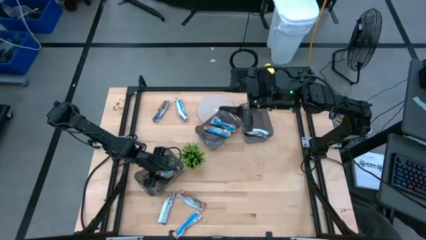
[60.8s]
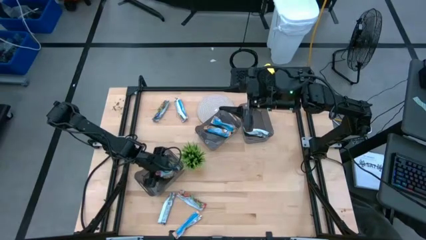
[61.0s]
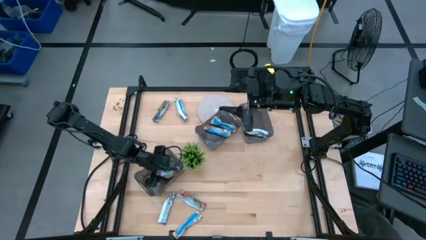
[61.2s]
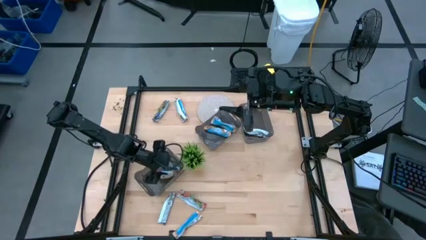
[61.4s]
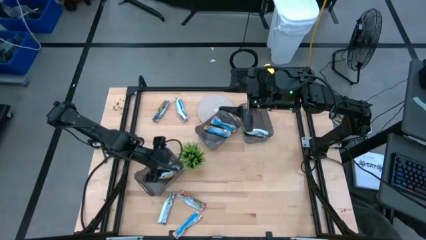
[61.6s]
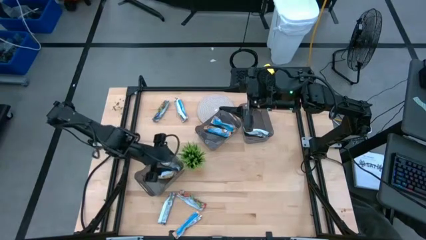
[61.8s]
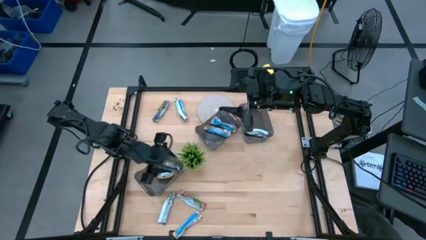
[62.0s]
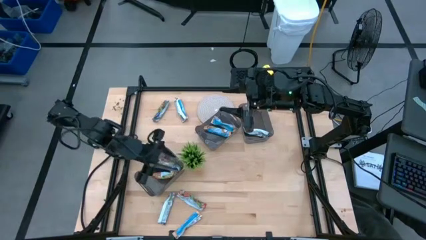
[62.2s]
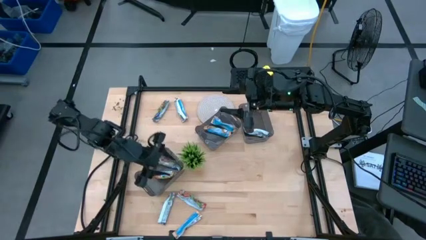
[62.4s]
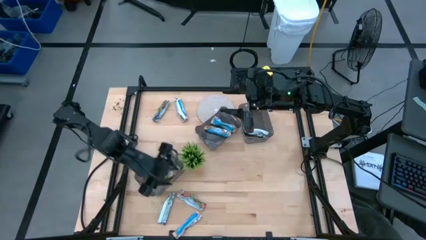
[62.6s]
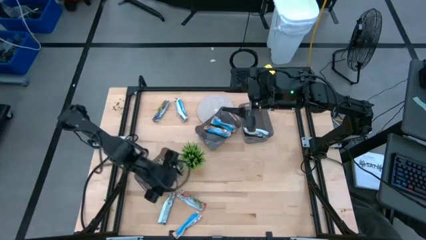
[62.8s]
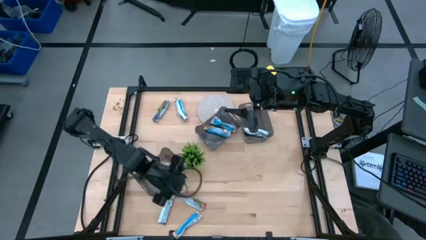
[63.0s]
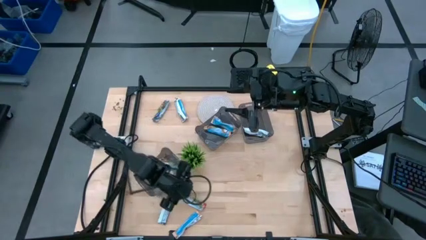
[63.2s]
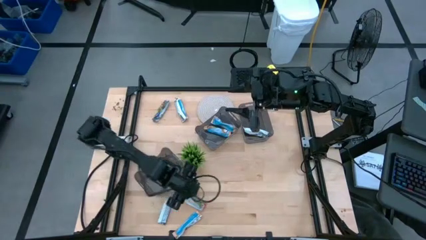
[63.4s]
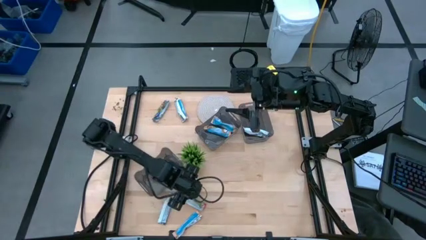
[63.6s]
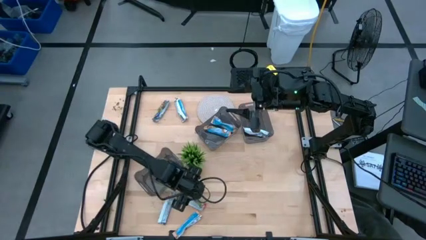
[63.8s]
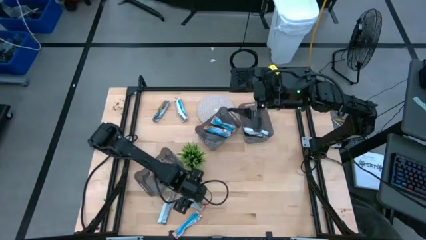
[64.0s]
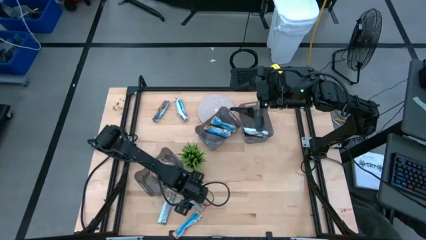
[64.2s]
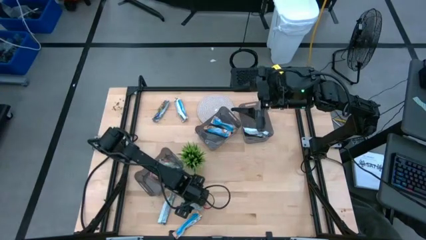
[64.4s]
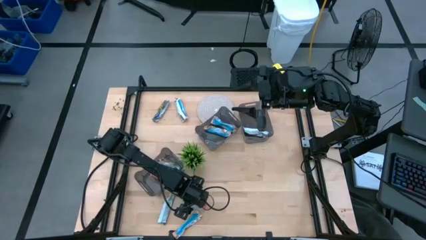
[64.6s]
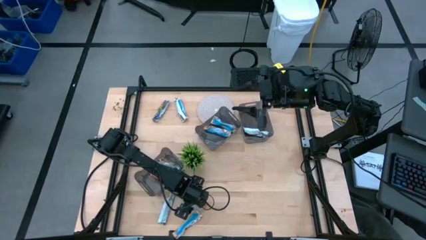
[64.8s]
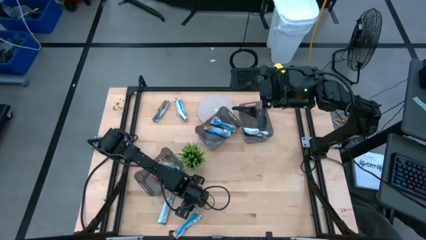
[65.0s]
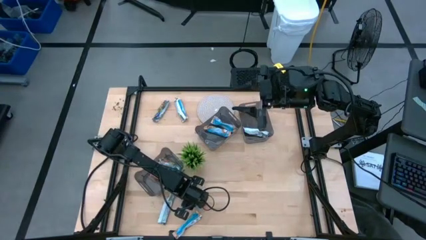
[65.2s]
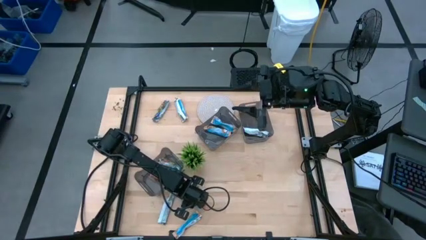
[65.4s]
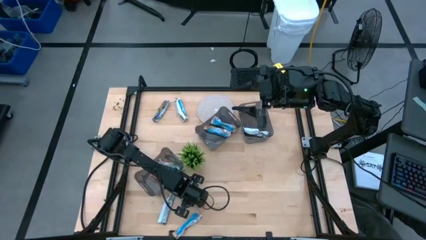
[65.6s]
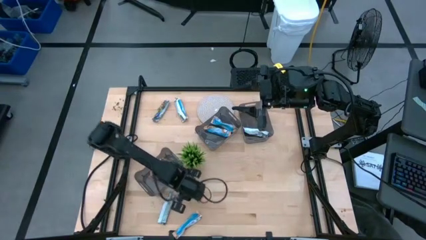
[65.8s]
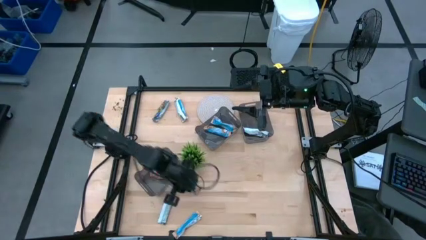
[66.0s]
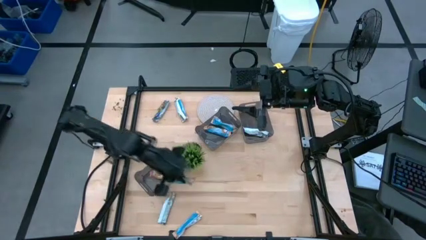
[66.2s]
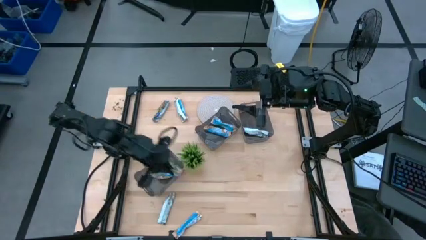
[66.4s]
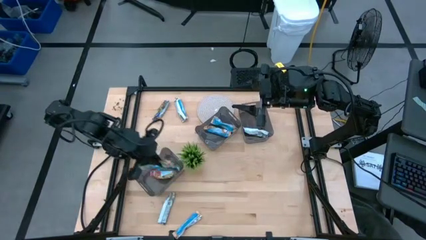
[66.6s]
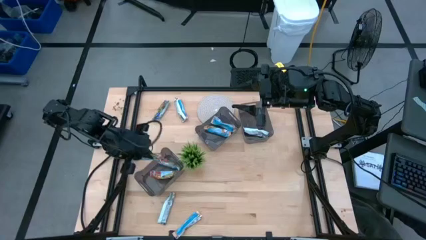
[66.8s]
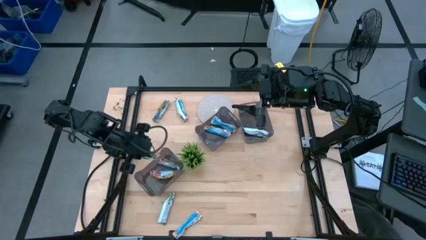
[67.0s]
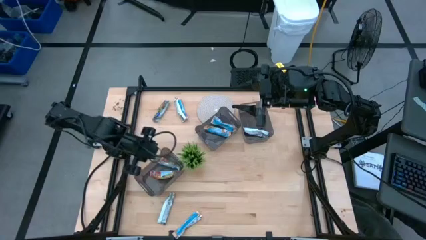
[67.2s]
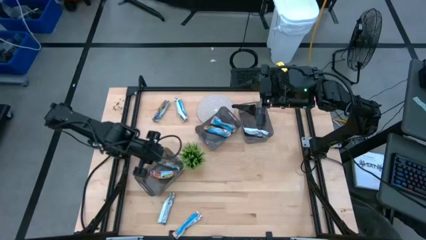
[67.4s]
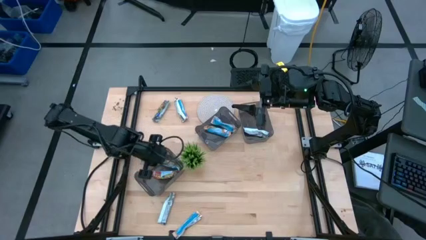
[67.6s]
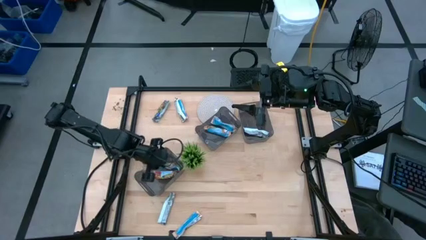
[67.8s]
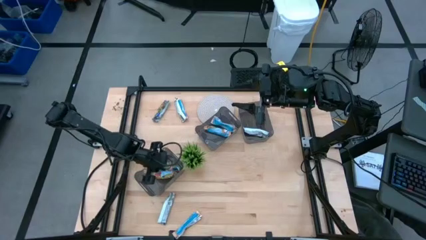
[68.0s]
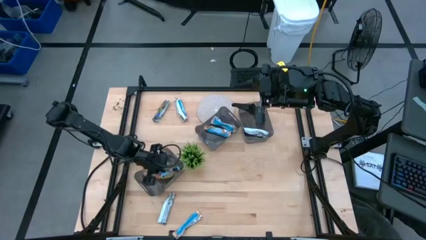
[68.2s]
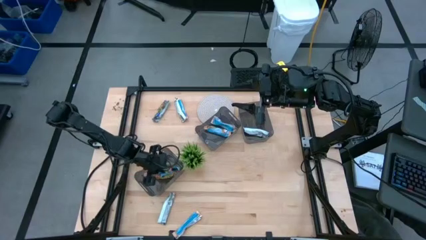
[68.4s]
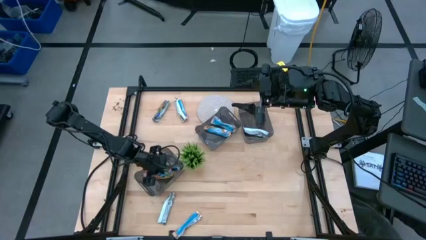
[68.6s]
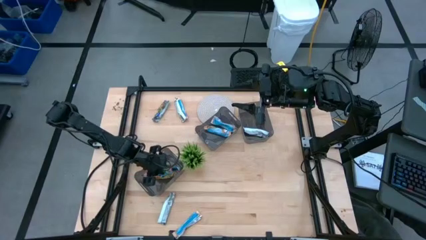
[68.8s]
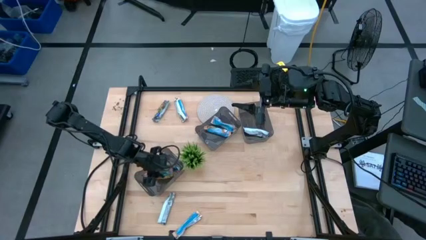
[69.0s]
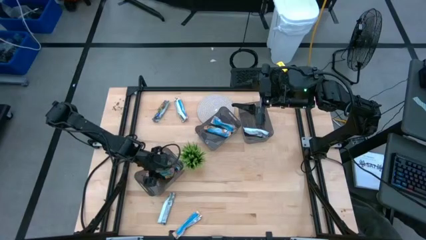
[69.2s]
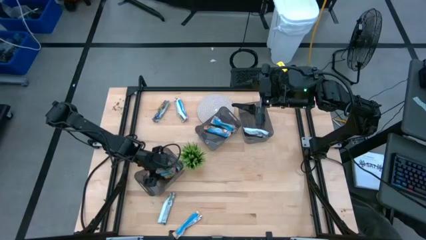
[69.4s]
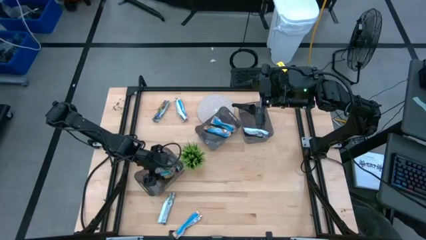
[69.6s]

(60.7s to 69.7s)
Task: Pick and place Granola Bars by type
Put the red granola bar into the bottom black bin

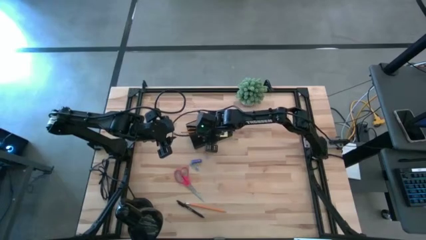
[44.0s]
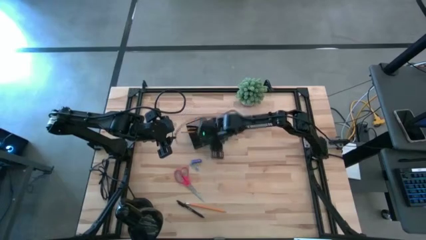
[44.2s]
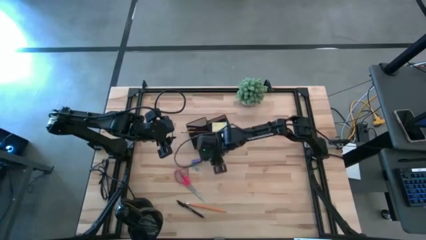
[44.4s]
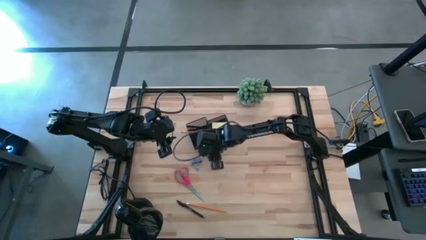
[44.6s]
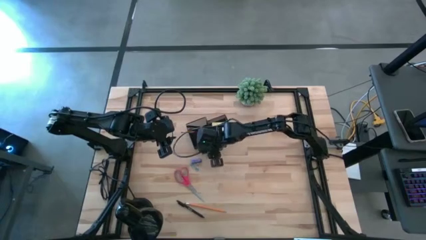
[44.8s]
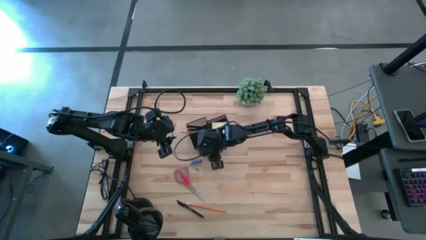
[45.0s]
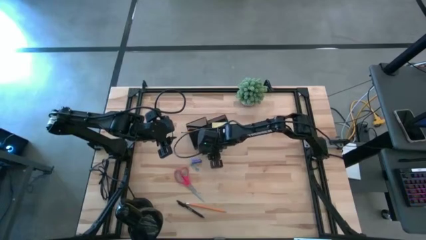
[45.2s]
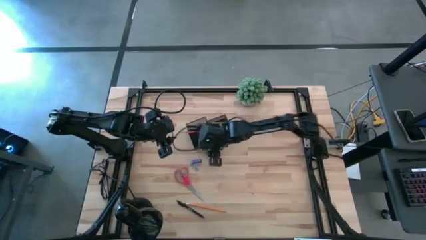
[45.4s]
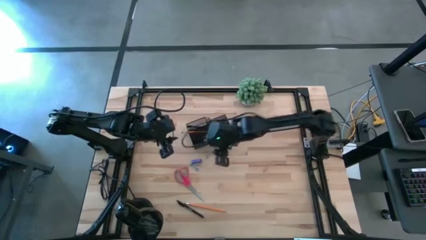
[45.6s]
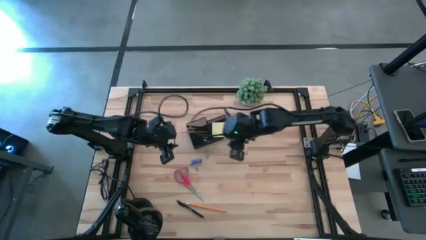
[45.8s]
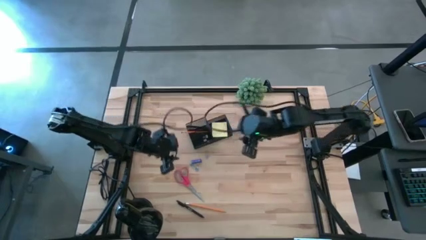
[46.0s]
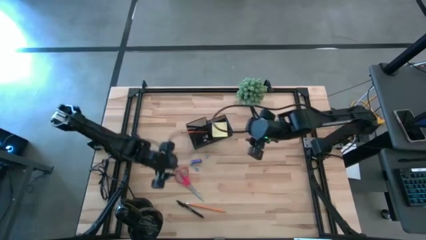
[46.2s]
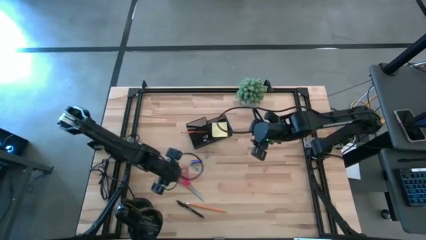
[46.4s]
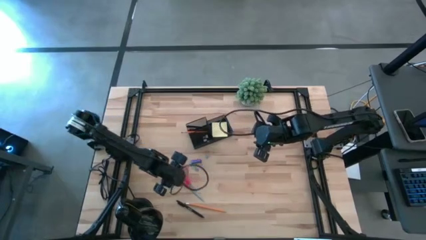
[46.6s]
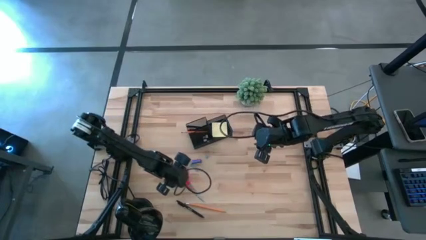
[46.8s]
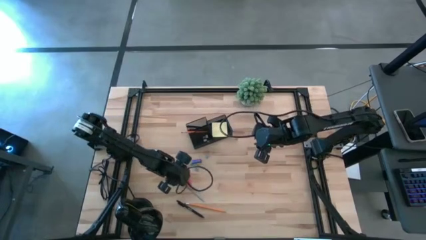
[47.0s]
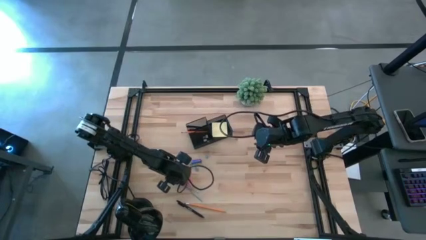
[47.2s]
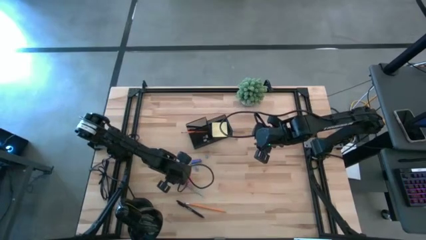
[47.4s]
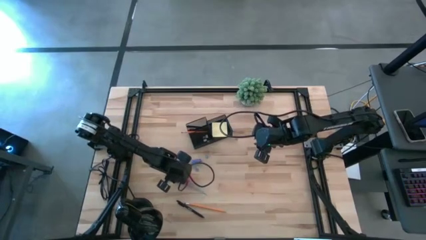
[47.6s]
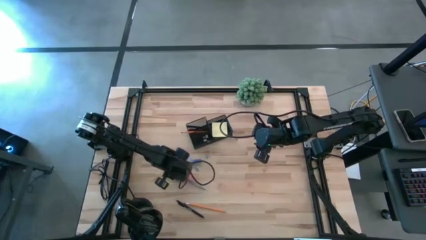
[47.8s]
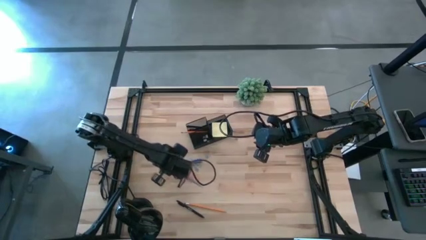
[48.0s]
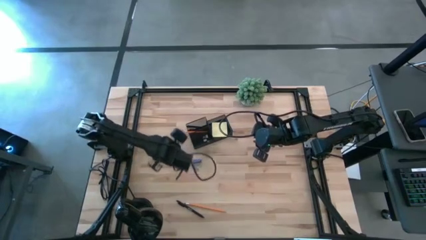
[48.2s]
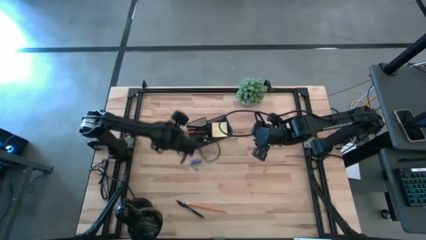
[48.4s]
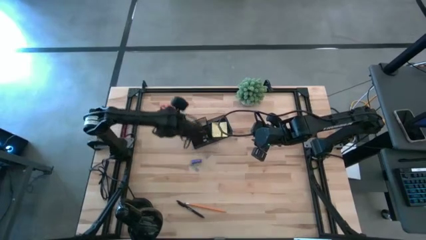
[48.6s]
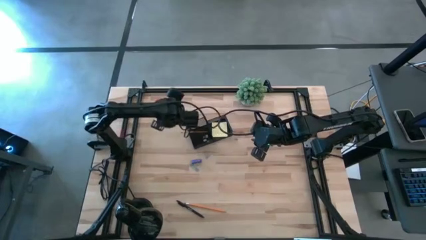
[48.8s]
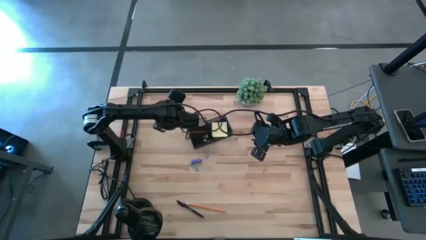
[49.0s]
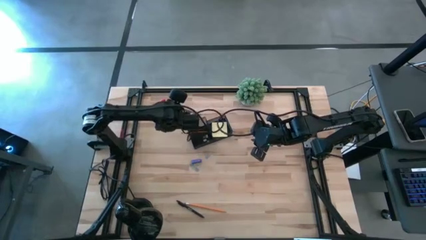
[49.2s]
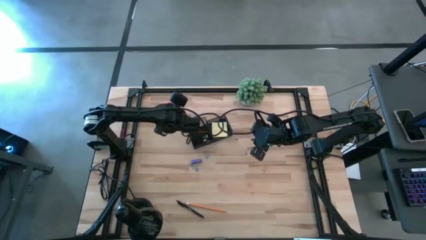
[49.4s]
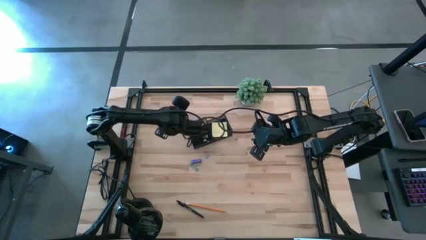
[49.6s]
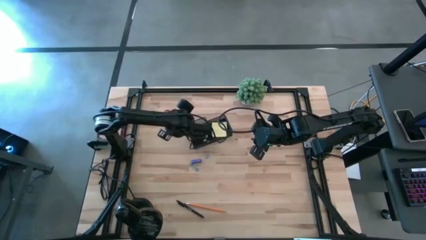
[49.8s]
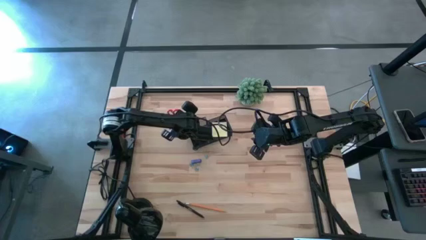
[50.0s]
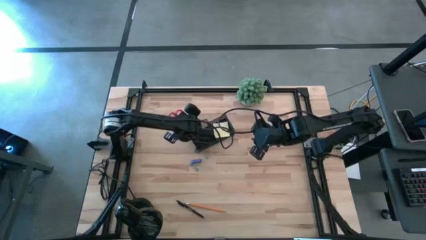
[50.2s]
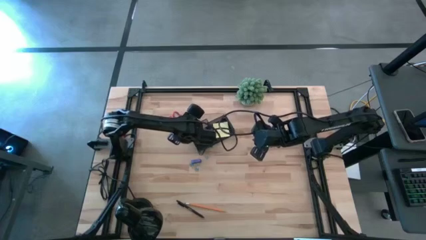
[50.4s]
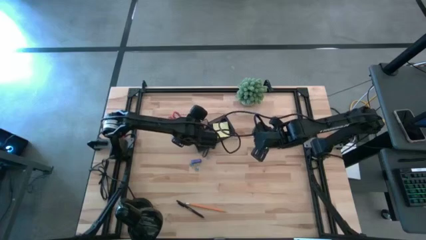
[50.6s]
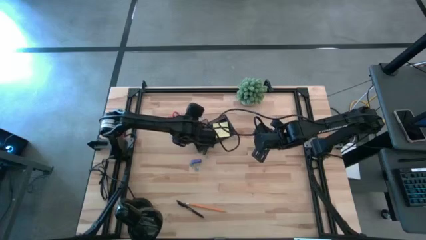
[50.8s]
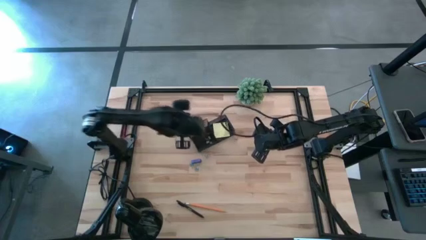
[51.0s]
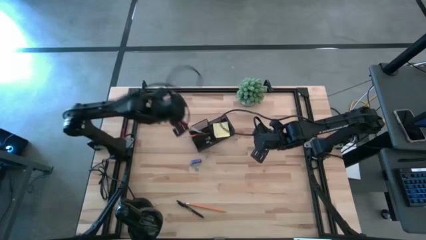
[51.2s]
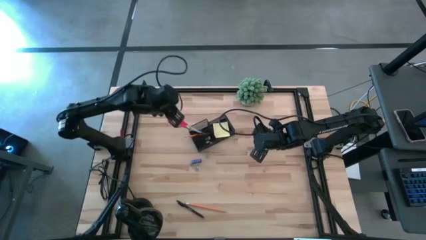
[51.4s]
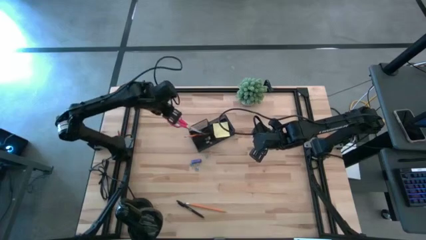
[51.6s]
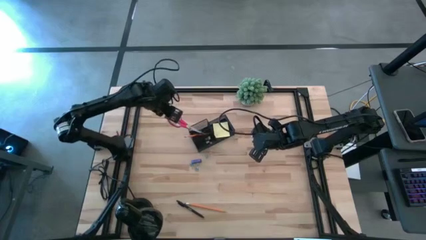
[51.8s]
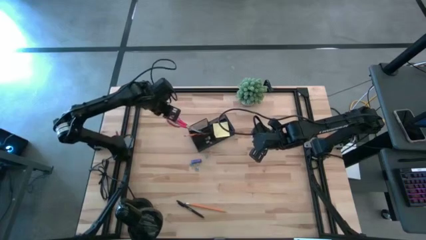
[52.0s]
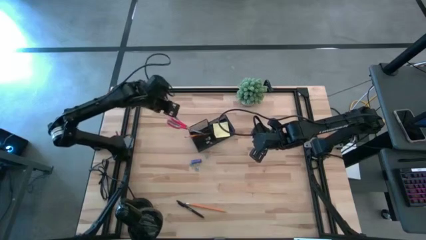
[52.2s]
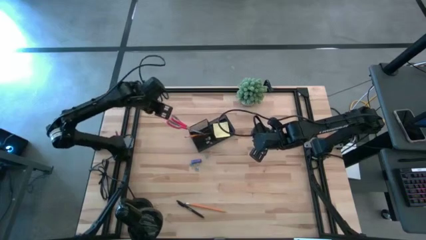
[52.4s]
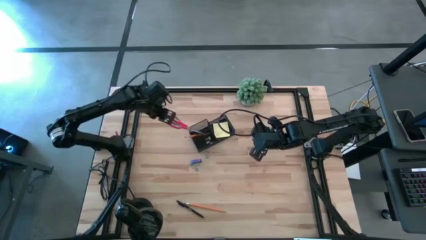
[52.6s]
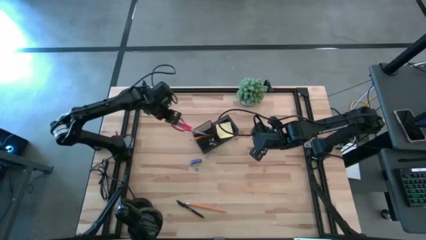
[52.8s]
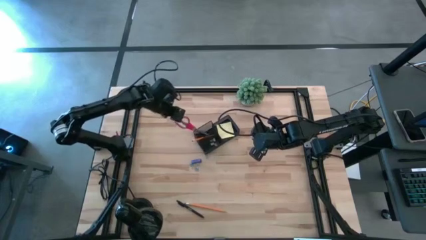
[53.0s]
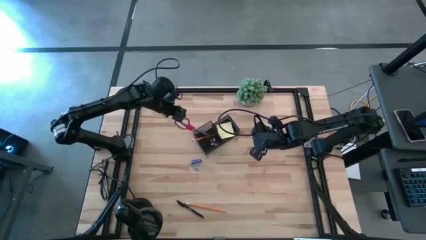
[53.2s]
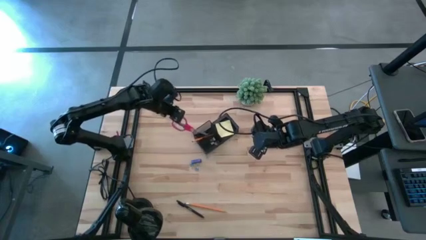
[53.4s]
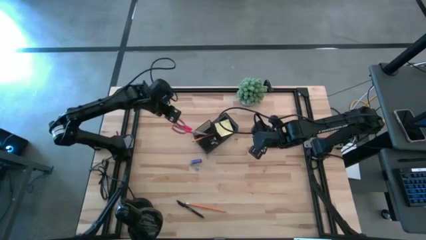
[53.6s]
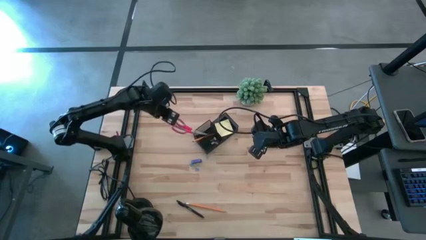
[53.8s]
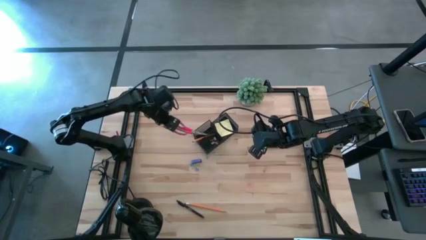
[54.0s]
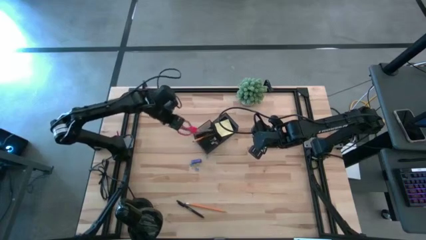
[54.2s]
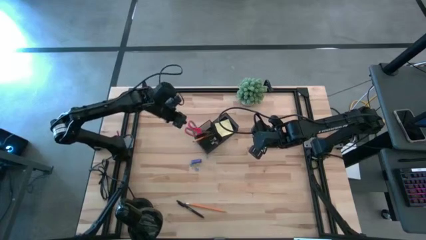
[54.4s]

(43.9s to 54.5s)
Task: Pick and place office supplies into organizer
Put the red scissors into the desk organizer
